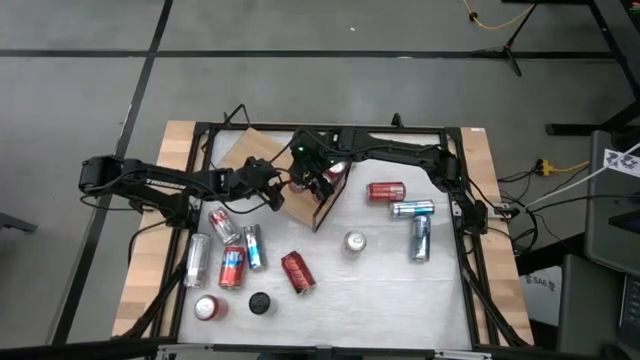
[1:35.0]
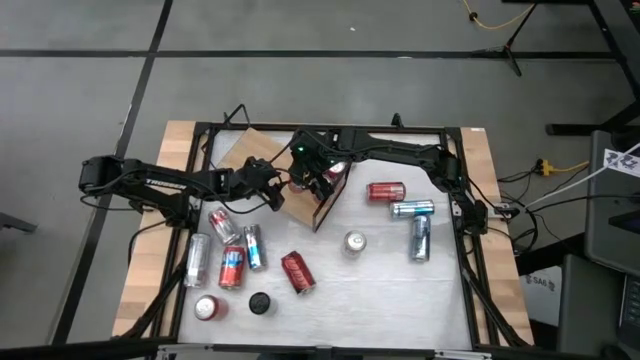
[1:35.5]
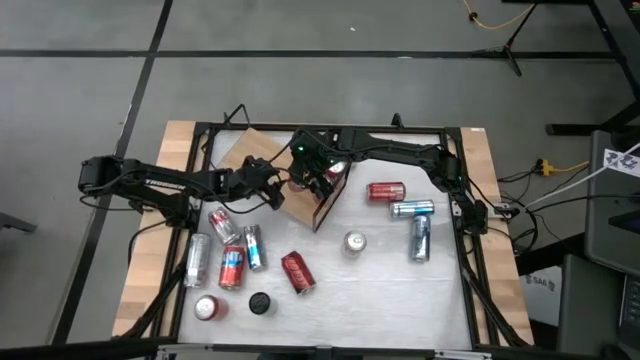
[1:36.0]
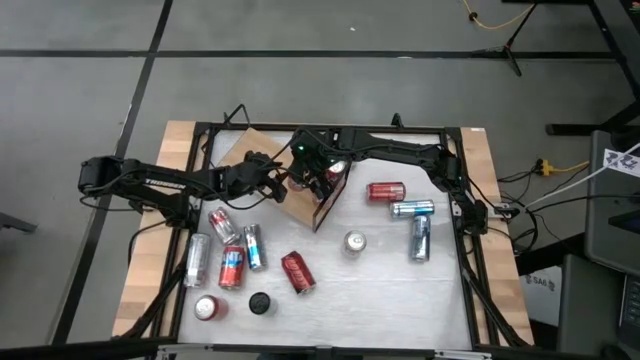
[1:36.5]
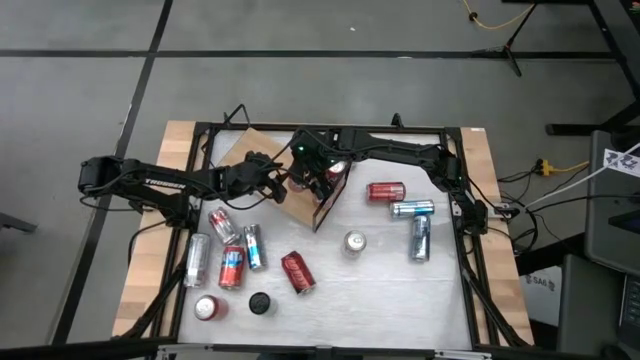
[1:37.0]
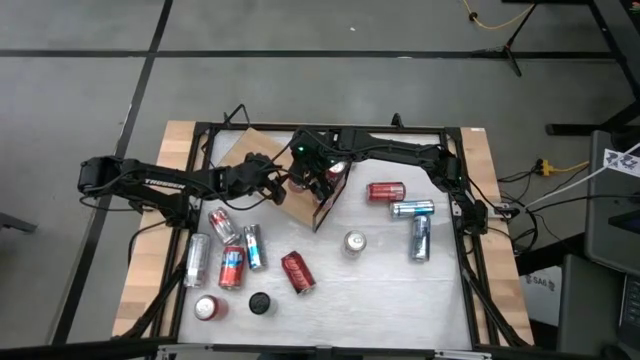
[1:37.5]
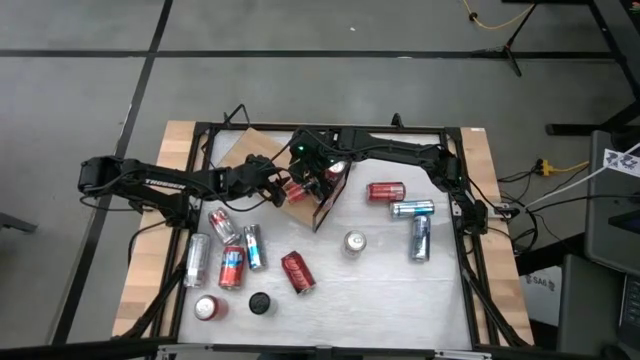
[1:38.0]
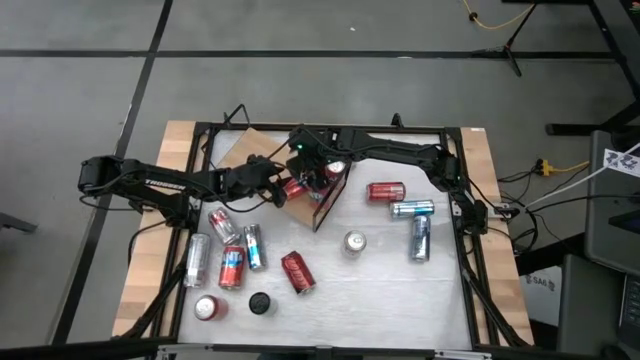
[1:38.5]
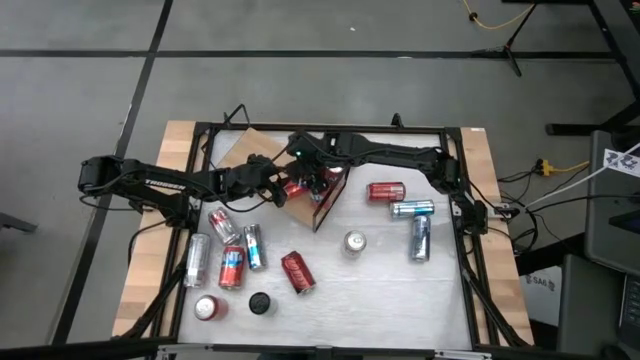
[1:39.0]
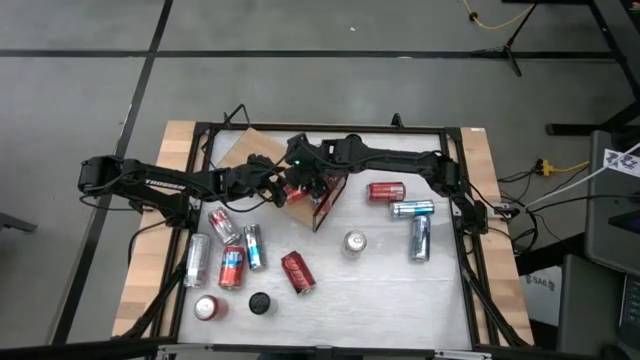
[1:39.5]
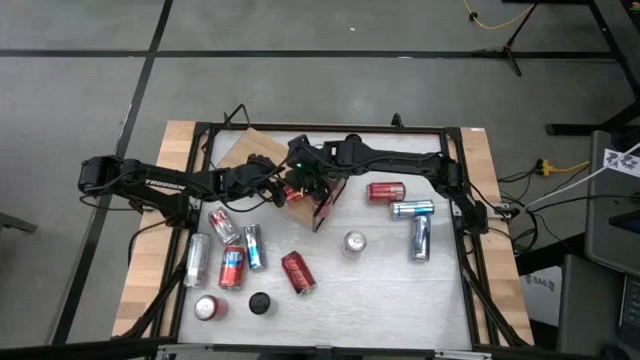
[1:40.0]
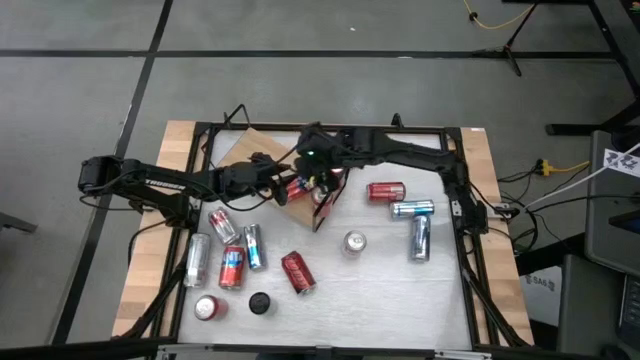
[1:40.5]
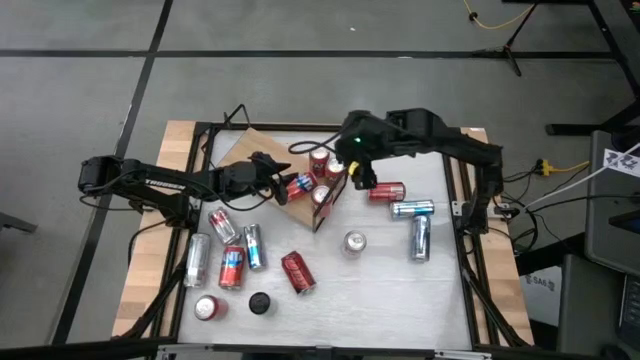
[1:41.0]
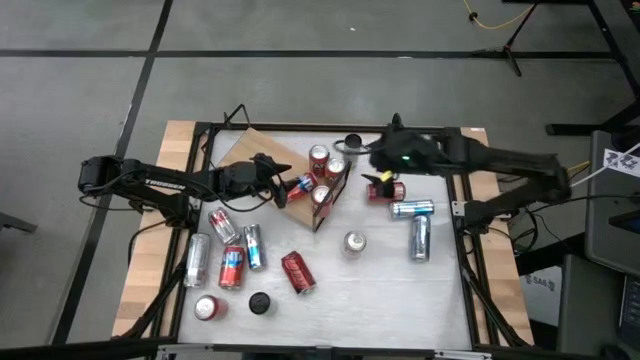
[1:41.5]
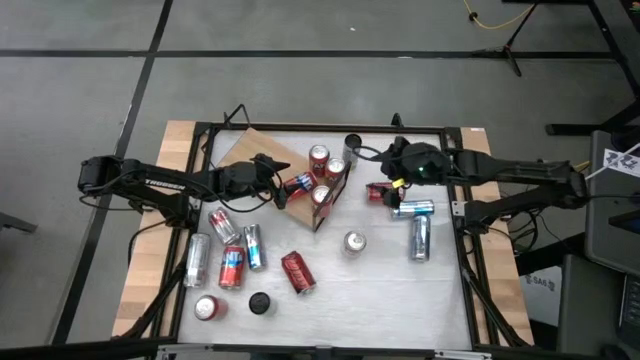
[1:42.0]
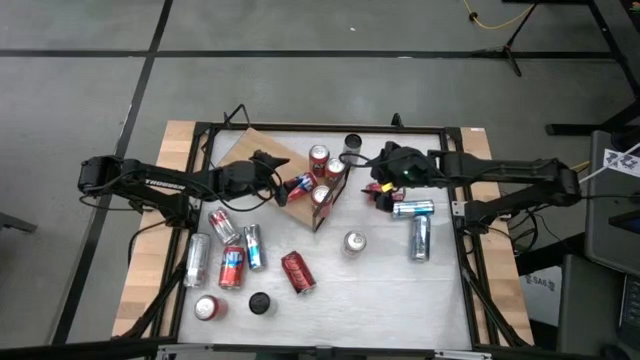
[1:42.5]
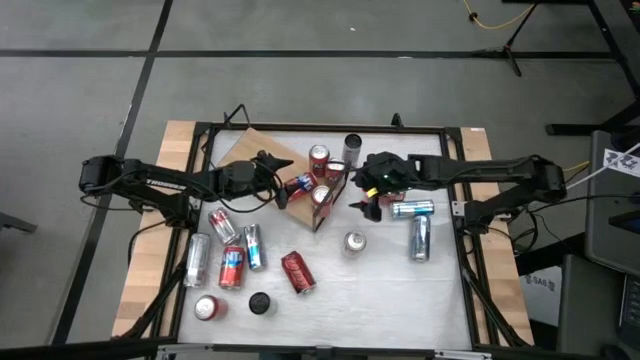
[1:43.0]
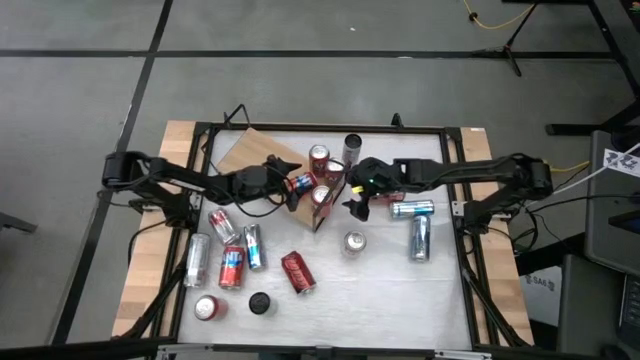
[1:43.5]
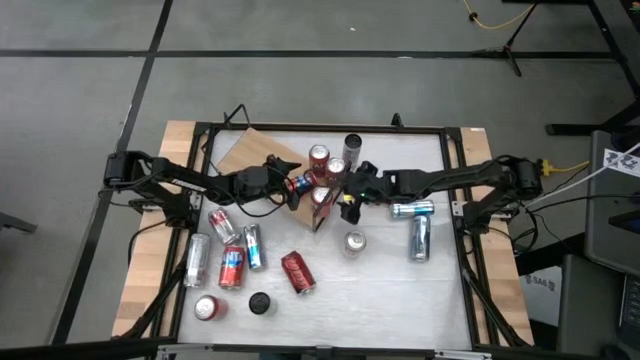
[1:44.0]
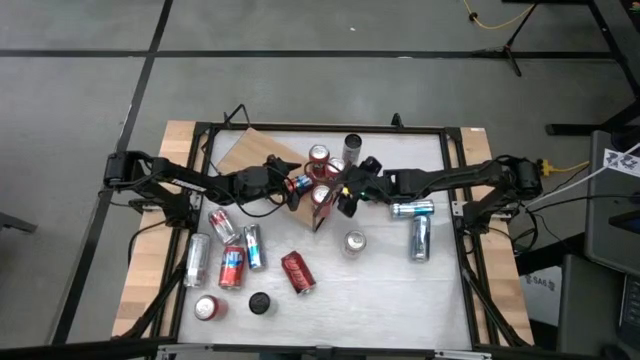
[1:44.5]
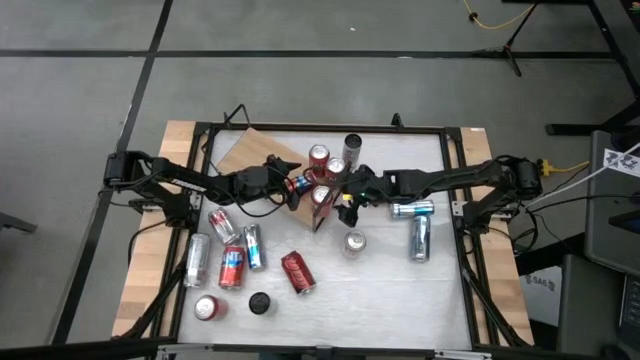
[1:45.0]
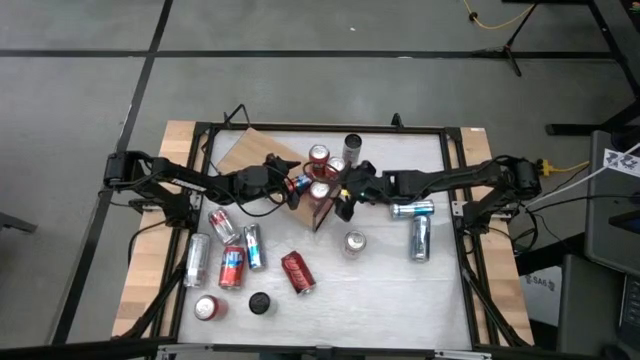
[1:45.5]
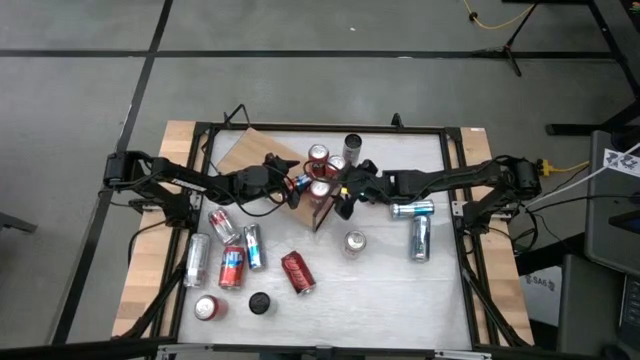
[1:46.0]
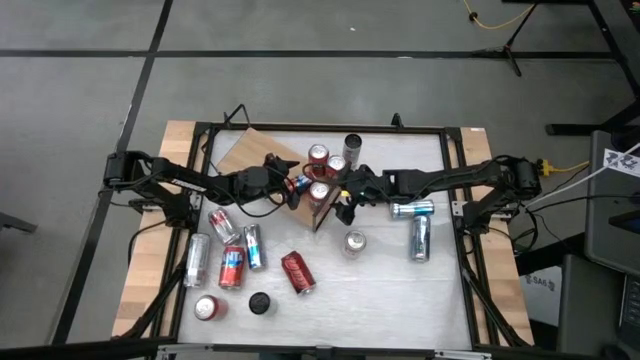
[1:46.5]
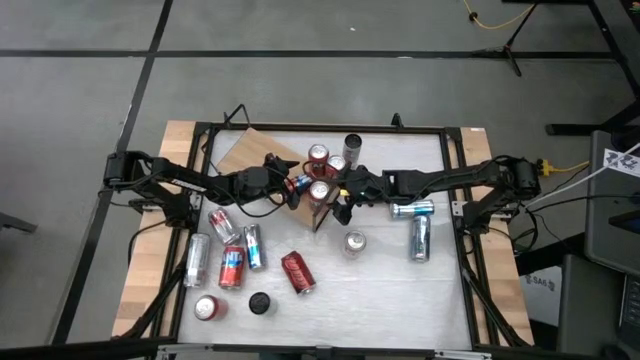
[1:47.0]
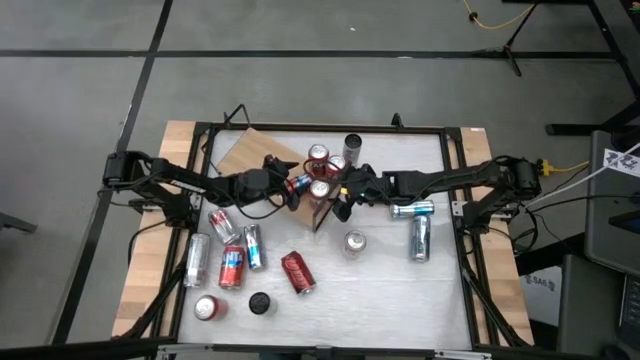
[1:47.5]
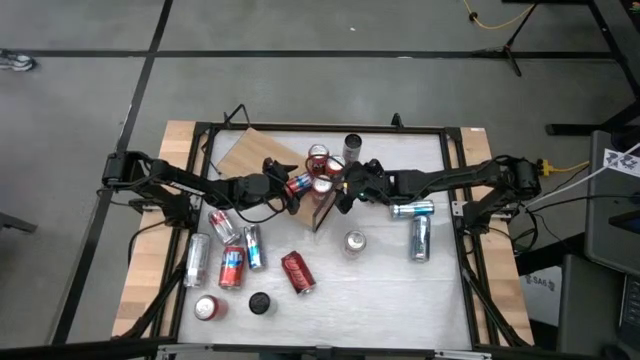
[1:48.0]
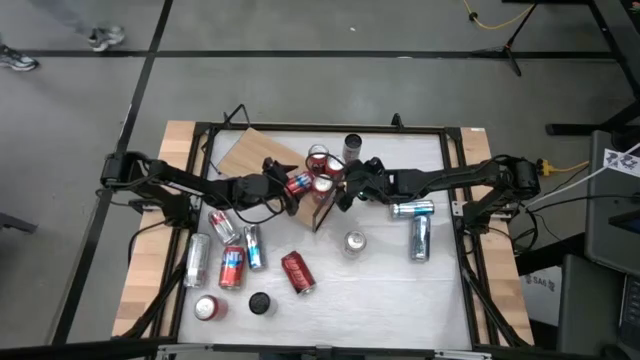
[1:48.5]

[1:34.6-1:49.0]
Task: Pick and place cans onto a shelf
Put the bottom right red soda can on the shelf aligned with the other red soda can

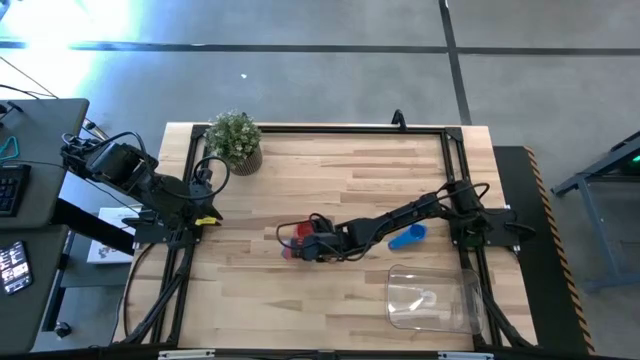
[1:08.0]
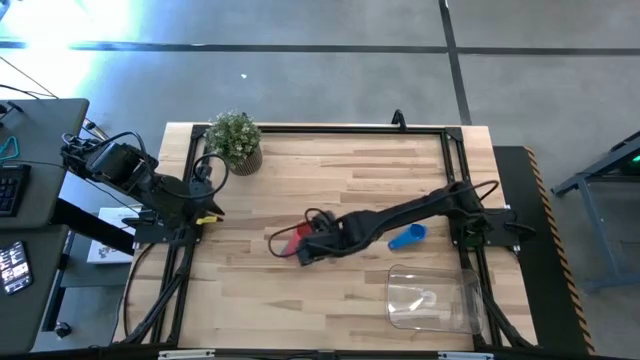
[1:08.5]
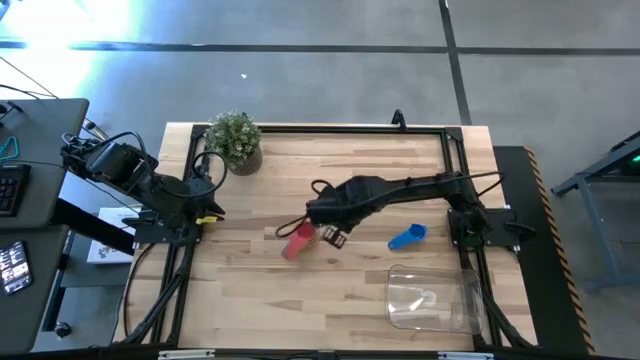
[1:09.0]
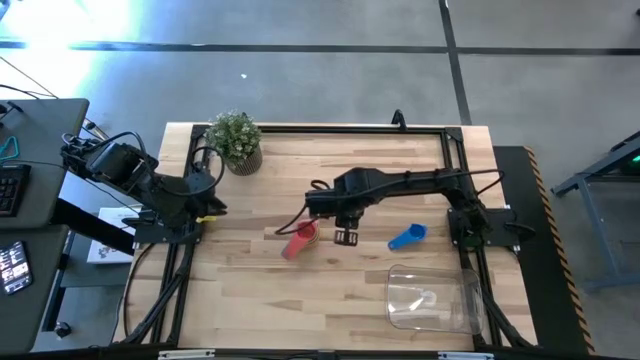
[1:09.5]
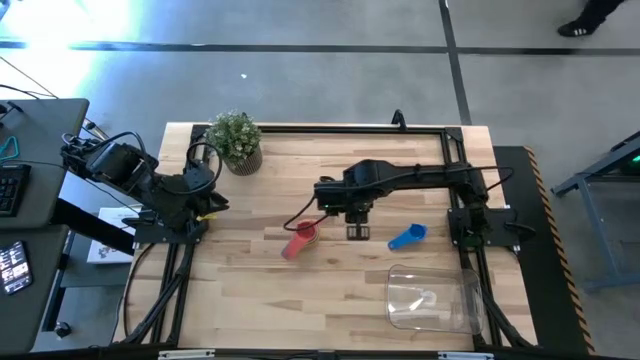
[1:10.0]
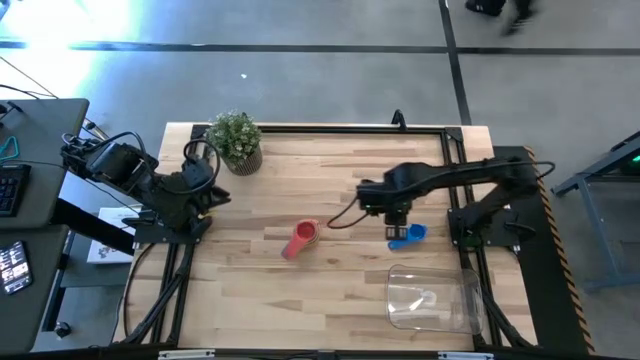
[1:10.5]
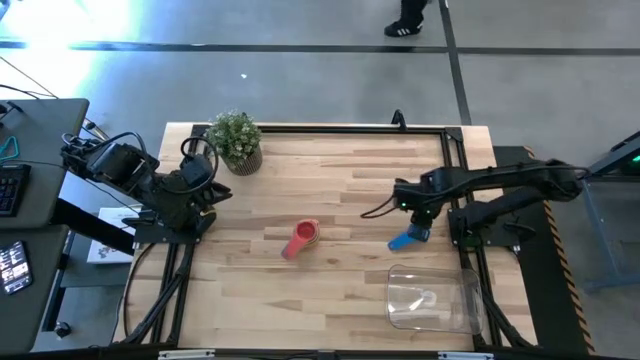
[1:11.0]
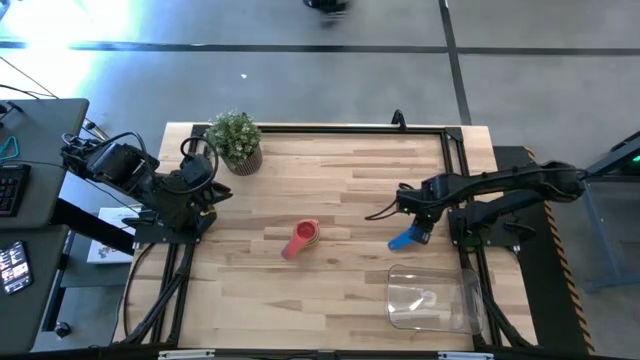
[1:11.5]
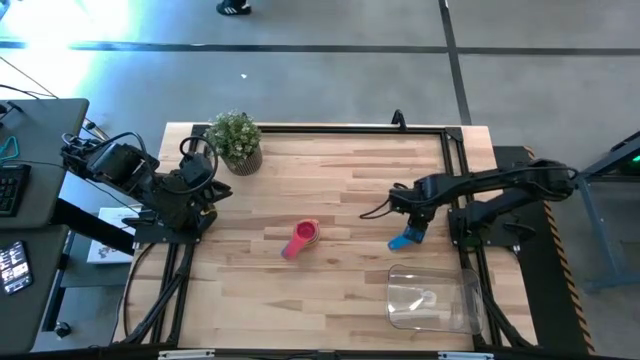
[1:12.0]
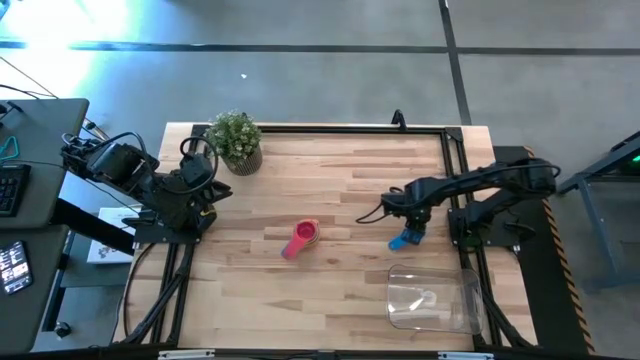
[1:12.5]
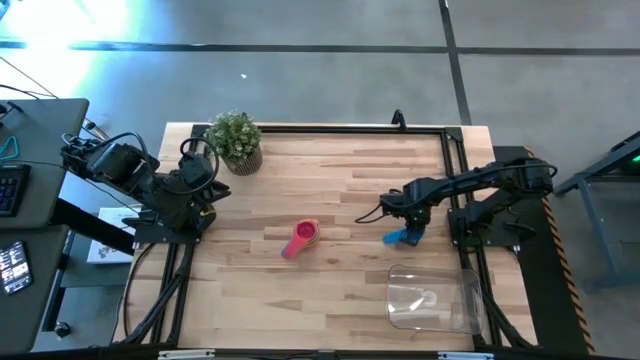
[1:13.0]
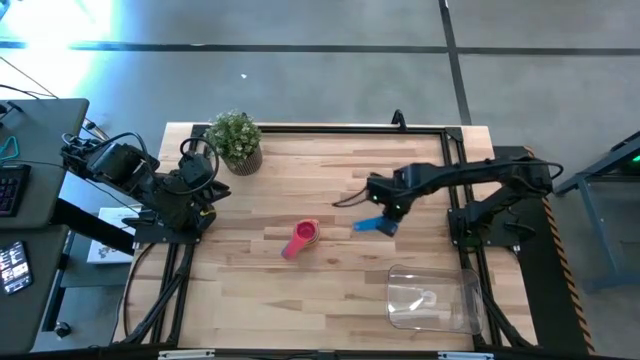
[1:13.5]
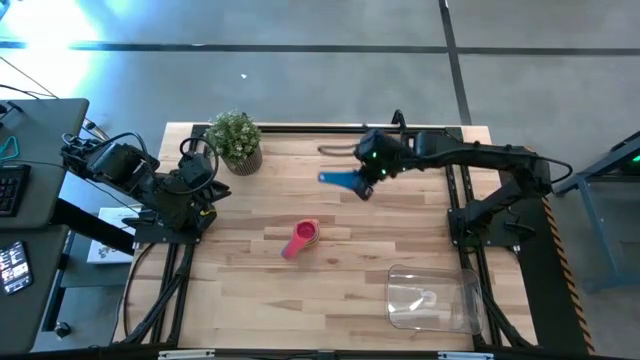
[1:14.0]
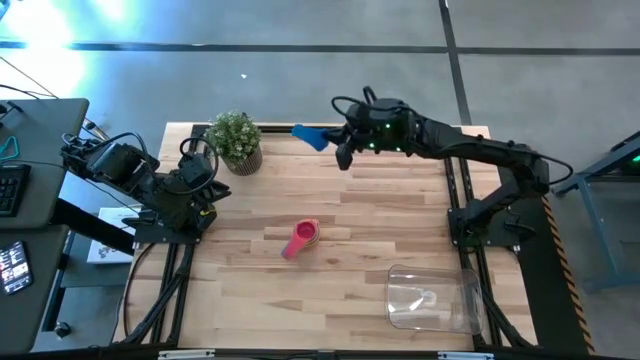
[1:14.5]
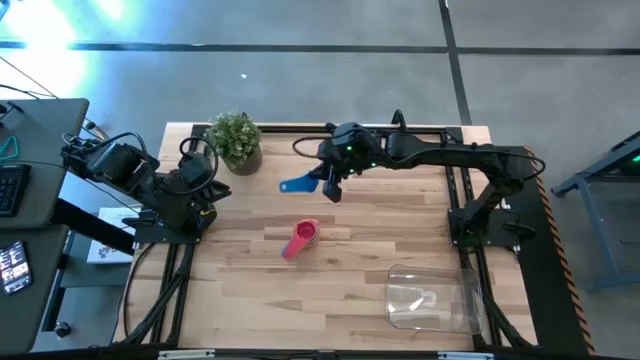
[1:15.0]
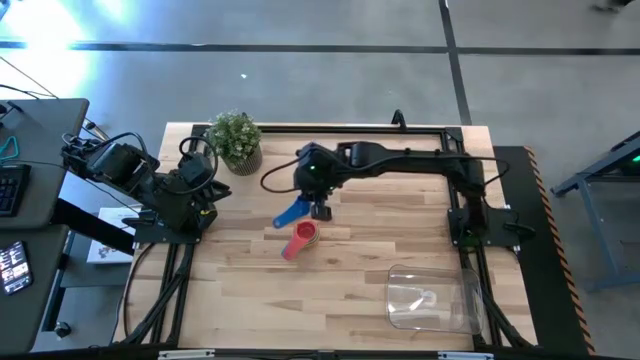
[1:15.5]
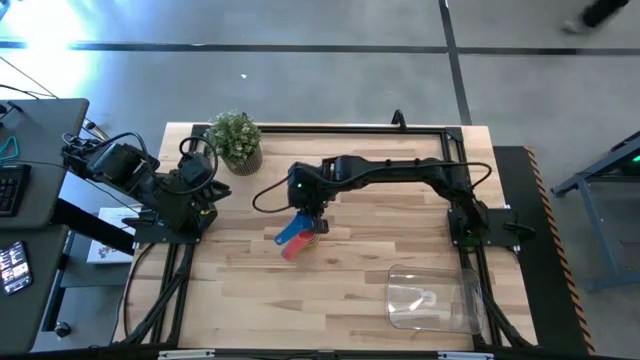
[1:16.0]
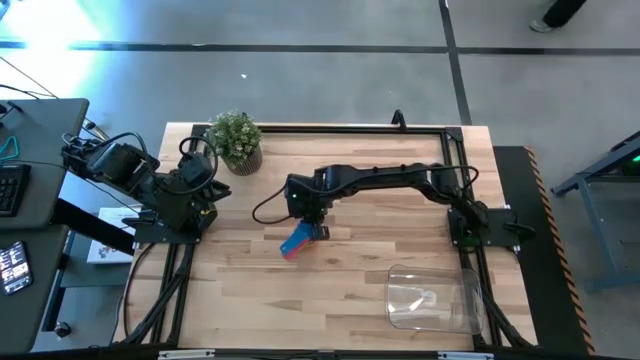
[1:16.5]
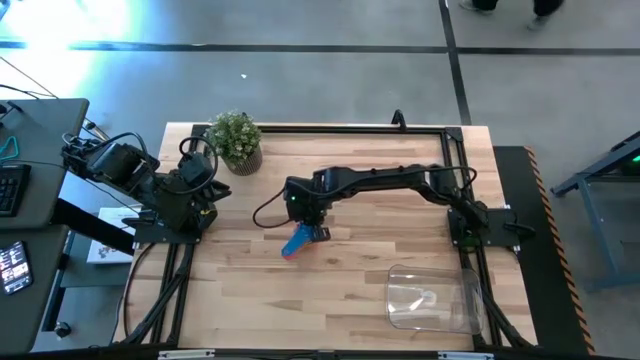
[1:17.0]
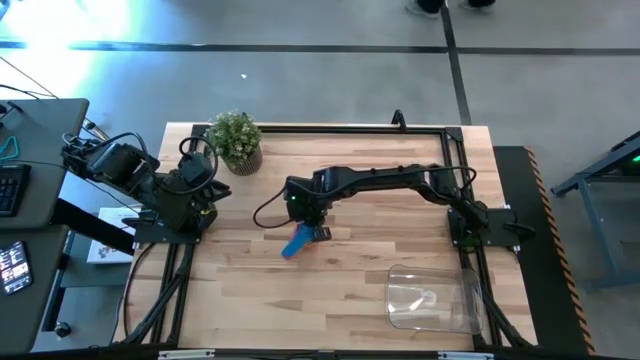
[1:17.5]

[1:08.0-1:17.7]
Task: Nest measuring cups in basket
Stack the blue measuring cup on top of the red measuring cup
